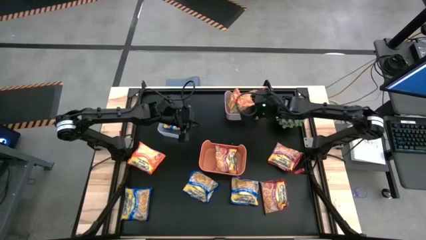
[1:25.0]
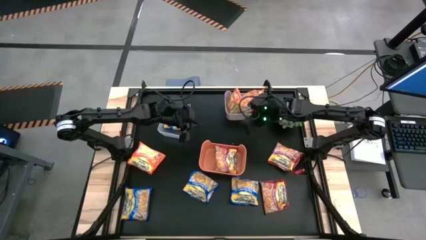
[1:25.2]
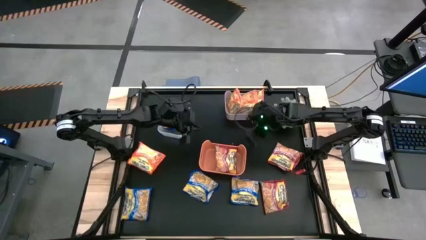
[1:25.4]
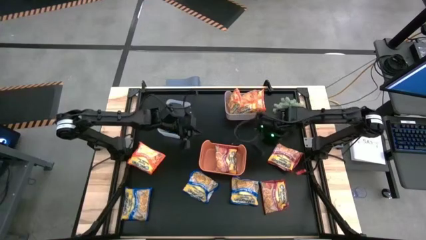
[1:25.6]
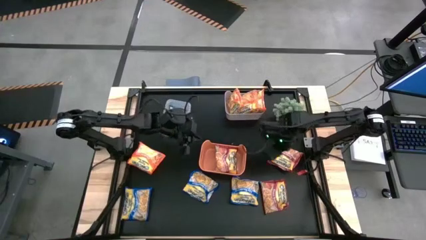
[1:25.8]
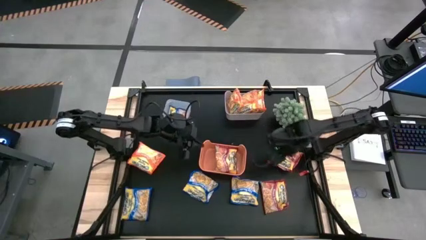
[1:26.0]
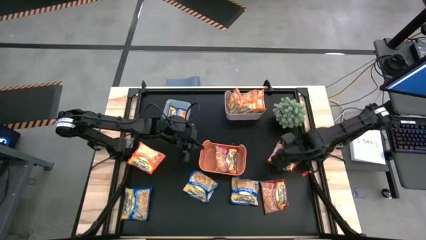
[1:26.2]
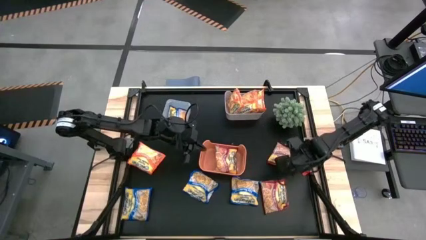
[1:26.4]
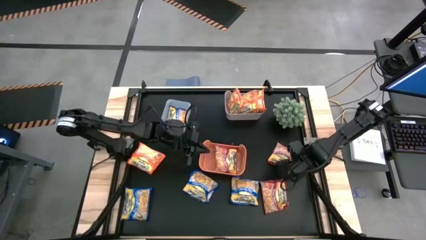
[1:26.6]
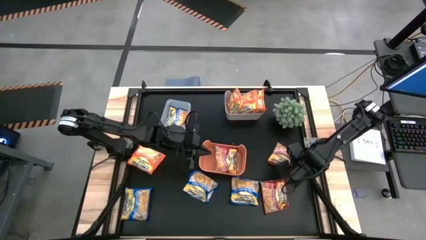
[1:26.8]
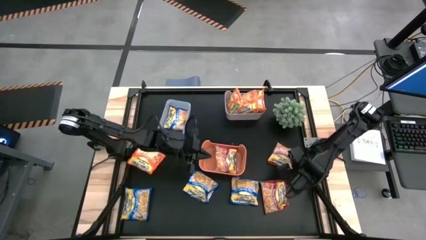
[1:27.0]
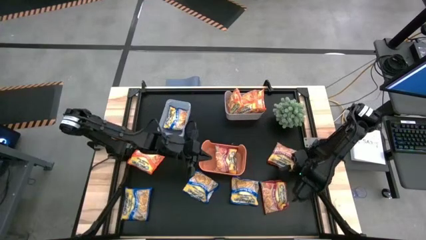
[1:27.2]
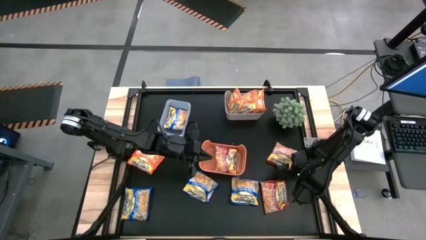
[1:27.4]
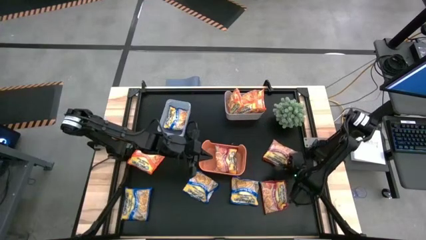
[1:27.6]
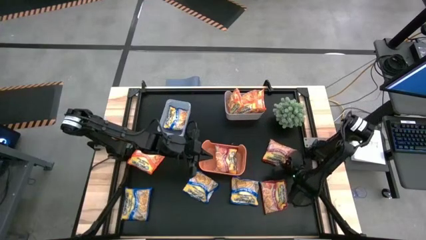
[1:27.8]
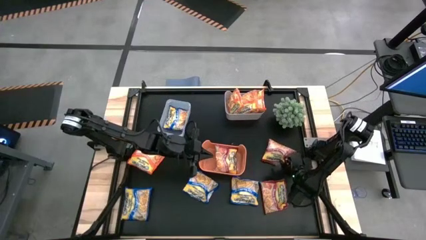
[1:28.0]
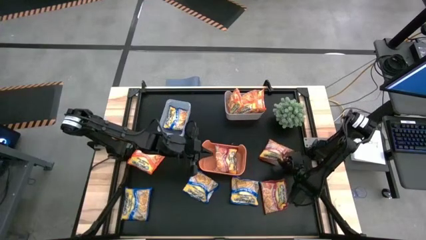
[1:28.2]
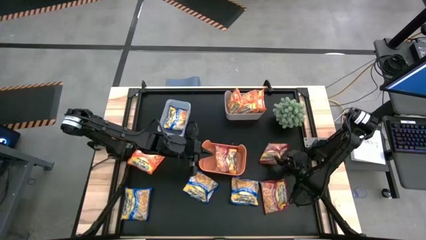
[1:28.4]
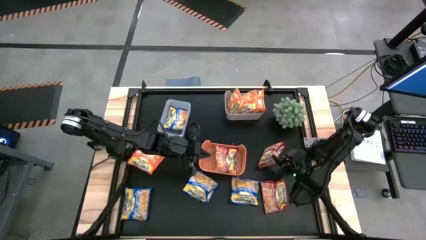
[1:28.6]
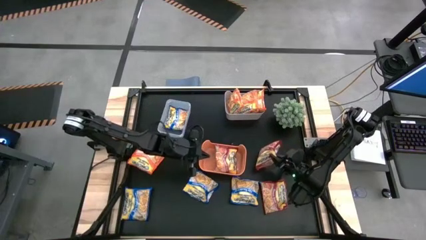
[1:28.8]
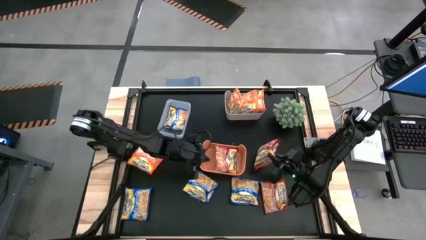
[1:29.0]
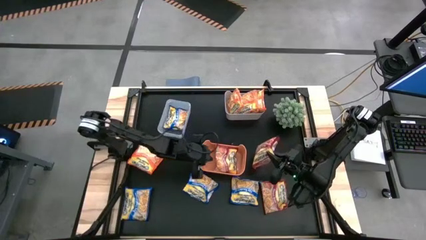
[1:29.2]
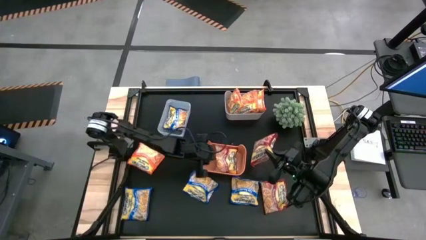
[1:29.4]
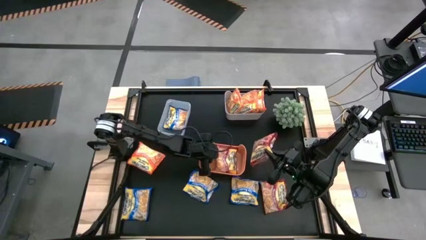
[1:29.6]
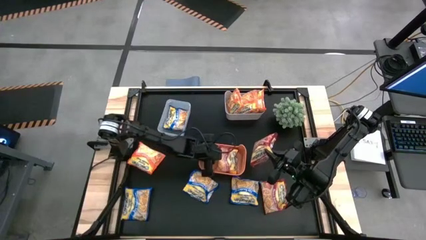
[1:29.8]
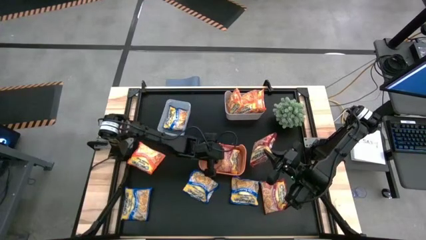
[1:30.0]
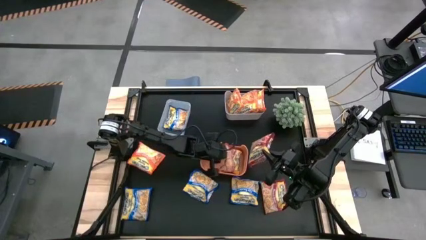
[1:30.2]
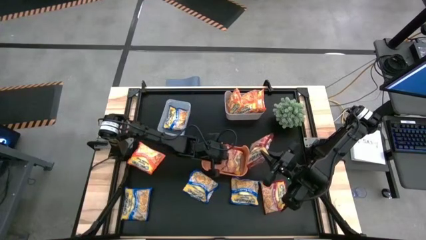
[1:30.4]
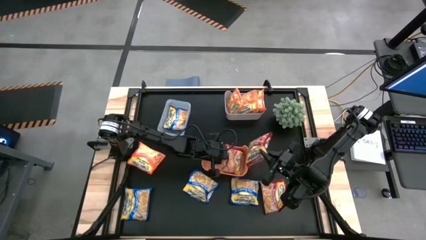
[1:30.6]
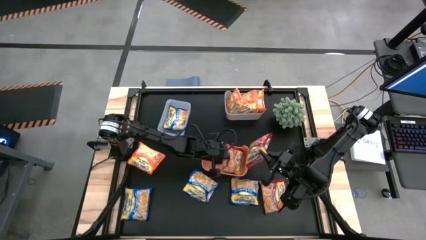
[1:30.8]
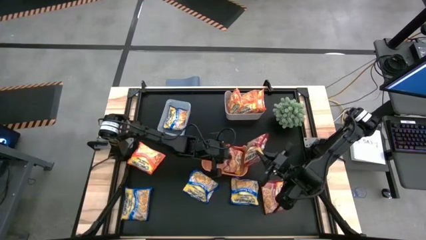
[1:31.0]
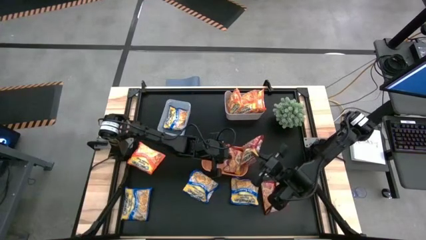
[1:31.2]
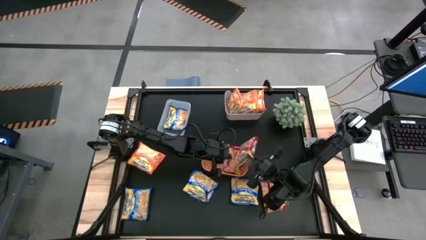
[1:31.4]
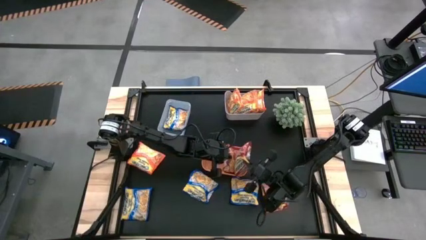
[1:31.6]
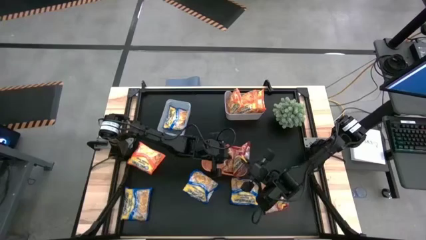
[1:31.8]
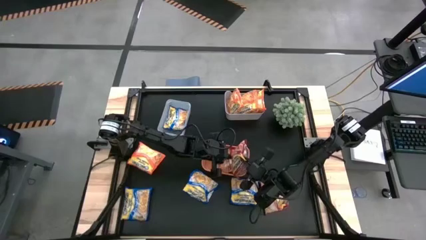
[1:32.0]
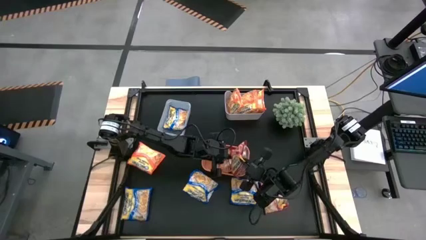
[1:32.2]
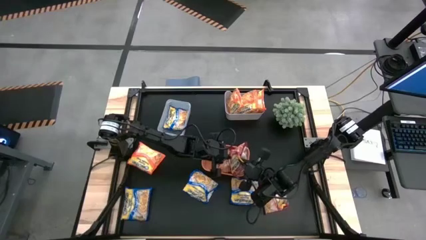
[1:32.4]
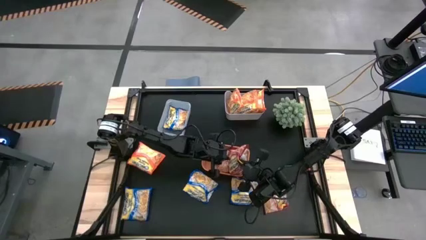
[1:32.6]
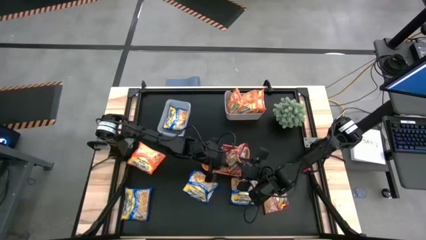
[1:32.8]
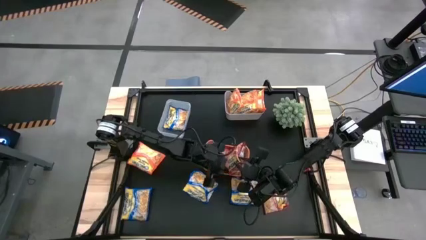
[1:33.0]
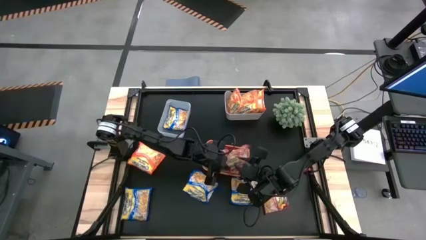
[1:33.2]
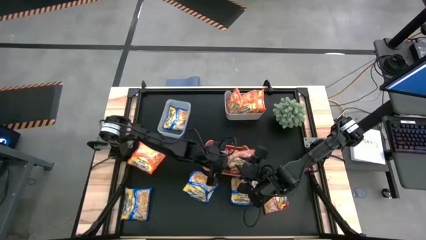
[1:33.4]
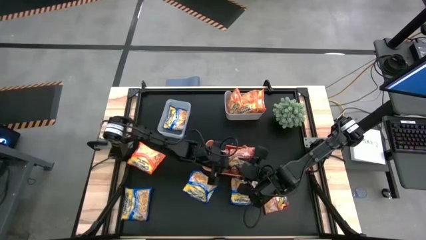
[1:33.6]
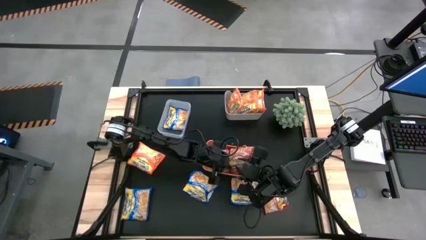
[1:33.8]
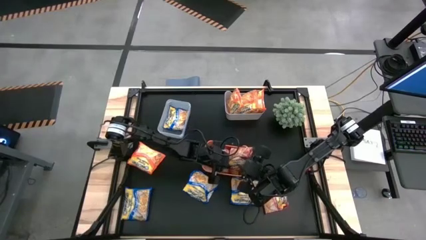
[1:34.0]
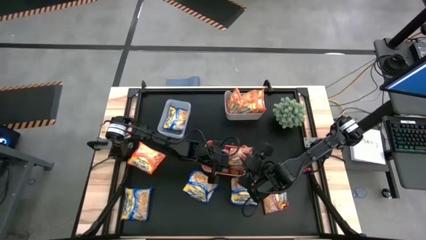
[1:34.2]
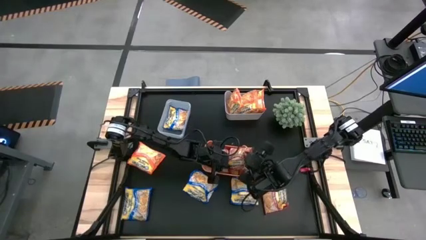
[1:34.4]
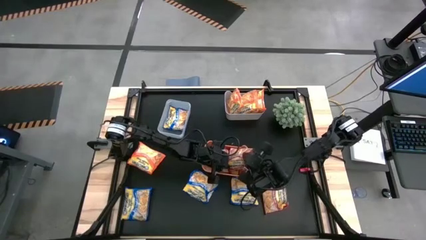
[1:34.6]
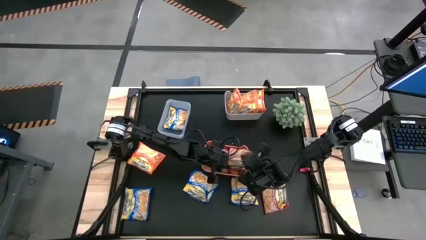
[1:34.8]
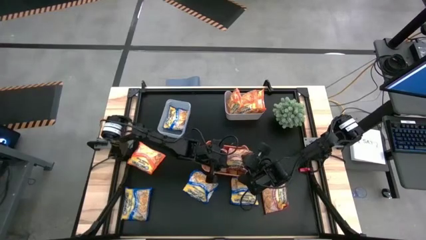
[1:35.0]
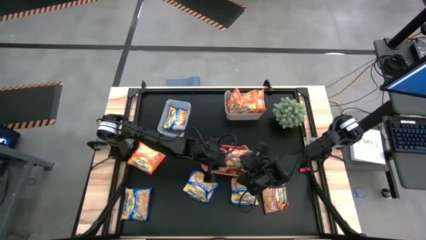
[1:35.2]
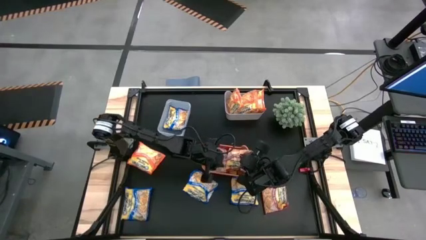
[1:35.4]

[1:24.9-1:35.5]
Task: Sort Maruchan noodles
Put the top red noodle packet into the orange bin

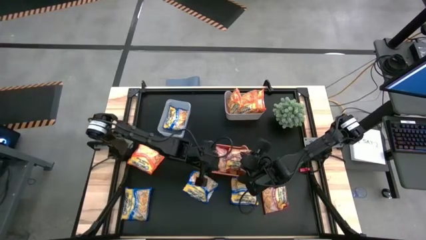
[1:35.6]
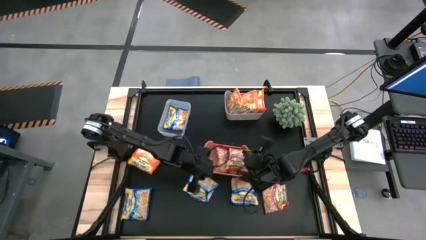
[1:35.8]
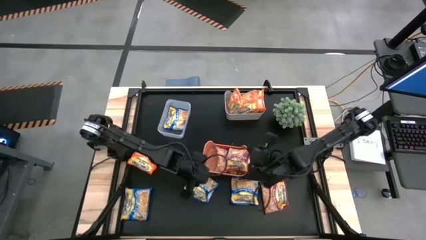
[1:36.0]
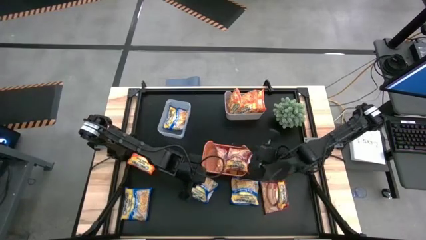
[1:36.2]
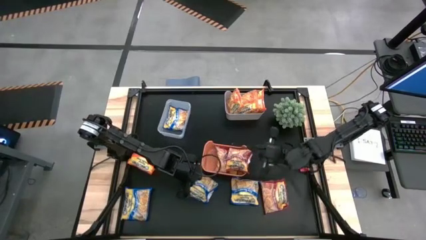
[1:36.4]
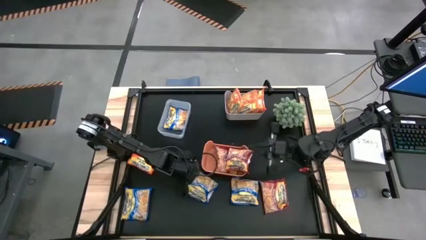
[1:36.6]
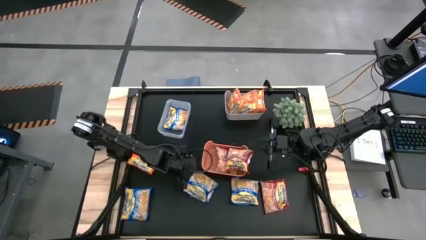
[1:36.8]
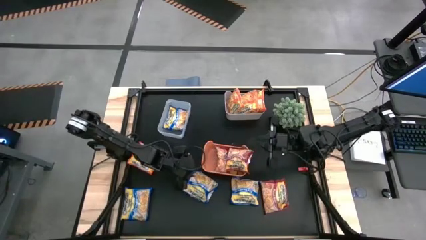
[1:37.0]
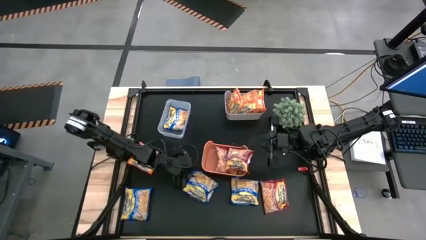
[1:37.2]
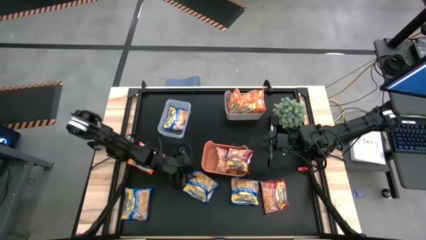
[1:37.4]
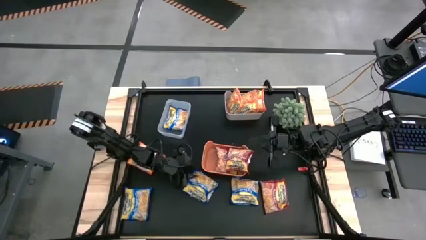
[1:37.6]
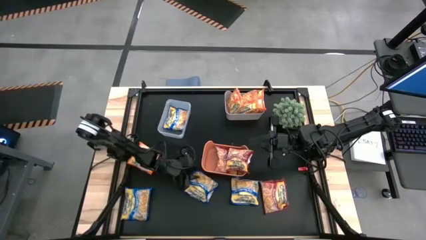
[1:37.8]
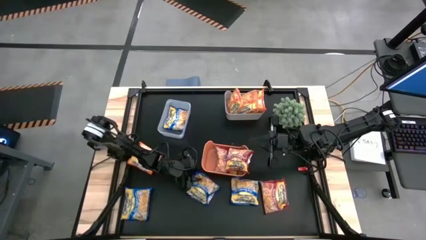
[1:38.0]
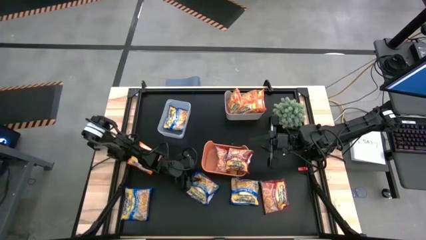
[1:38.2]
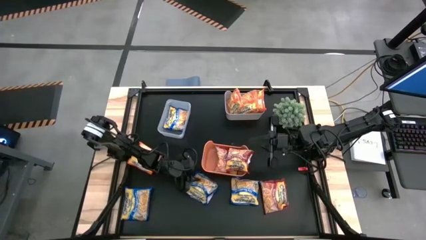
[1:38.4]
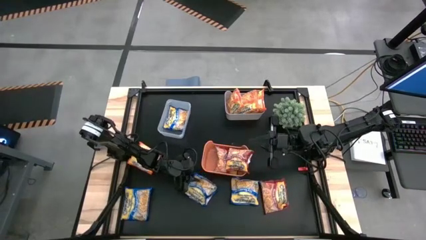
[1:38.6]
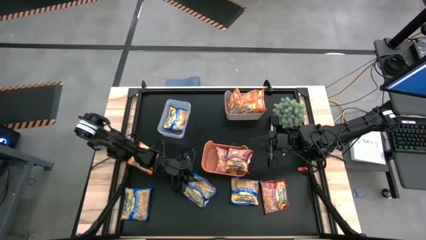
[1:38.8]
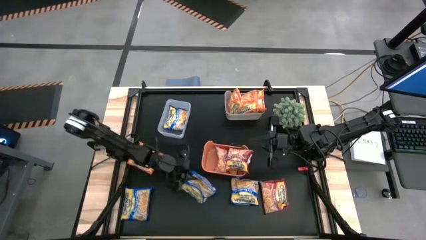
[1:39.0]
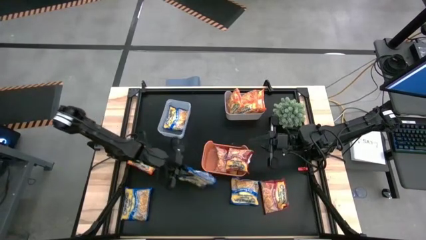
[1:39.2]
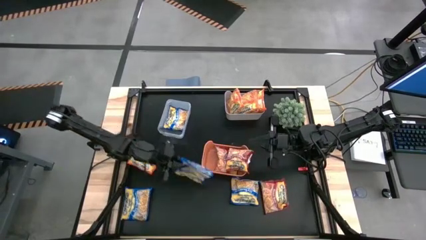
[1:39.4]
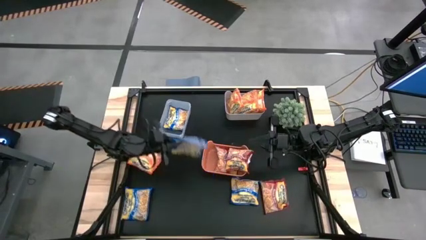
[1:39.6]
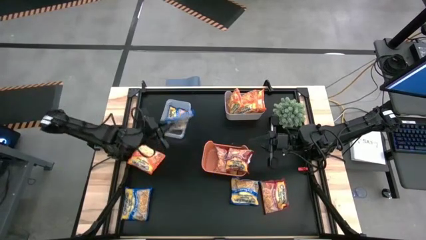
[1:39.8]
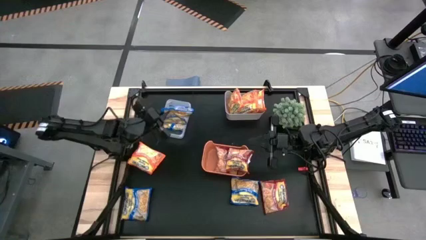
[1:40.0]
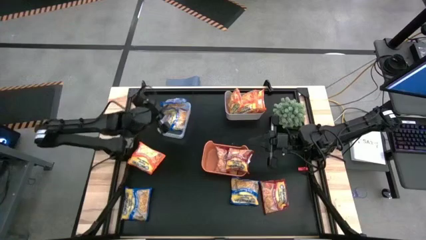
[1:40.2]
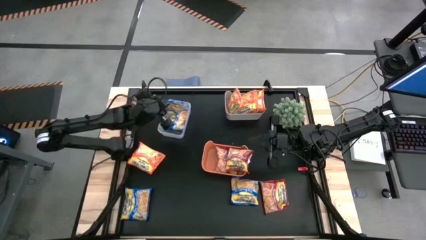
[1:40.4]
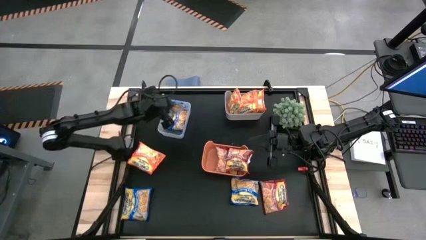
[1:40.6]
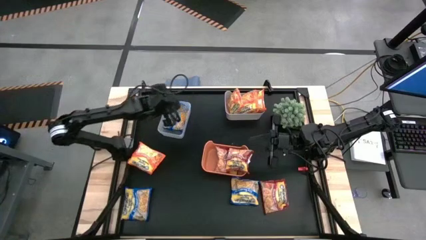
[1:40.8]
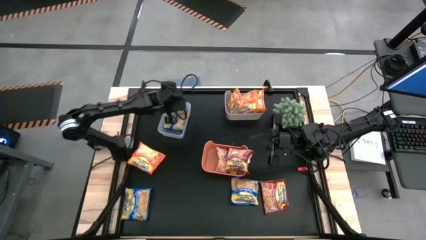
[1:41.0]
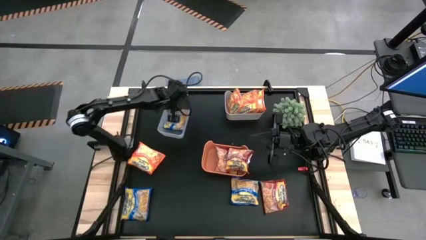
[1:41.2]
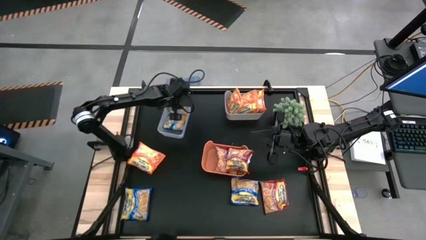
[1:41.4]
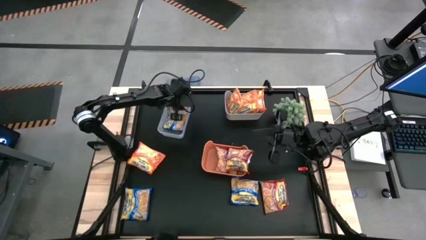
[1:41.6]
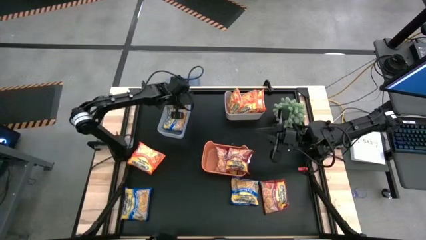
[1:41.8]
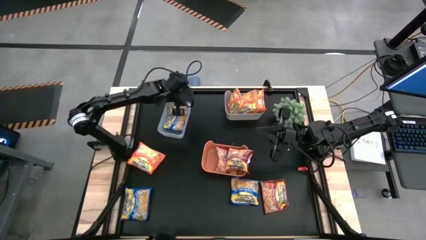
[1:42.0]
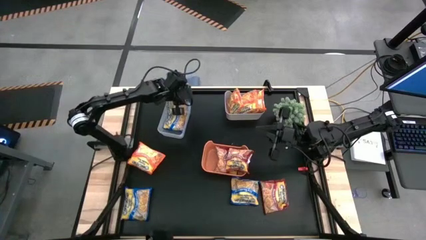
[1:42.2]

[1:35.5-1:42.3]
Put the middle blue noodle packet into the transparent bin
